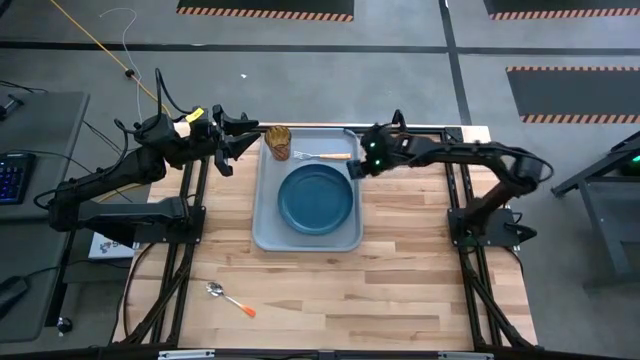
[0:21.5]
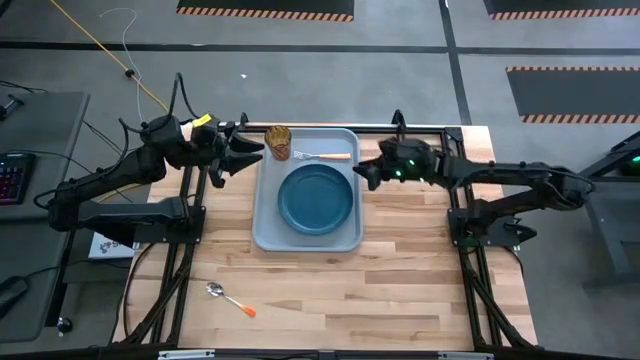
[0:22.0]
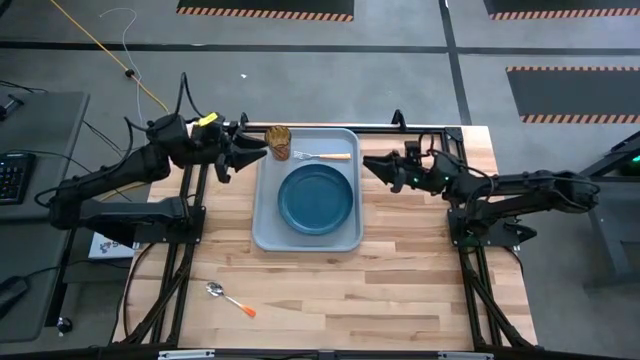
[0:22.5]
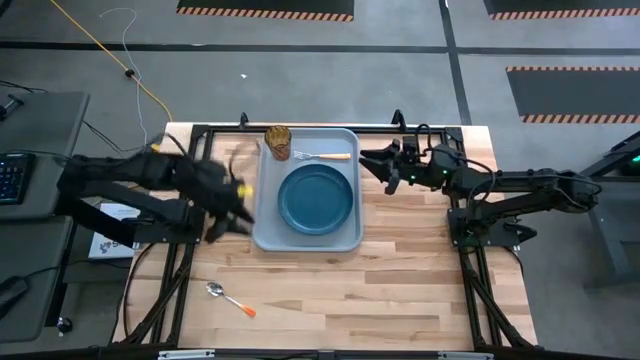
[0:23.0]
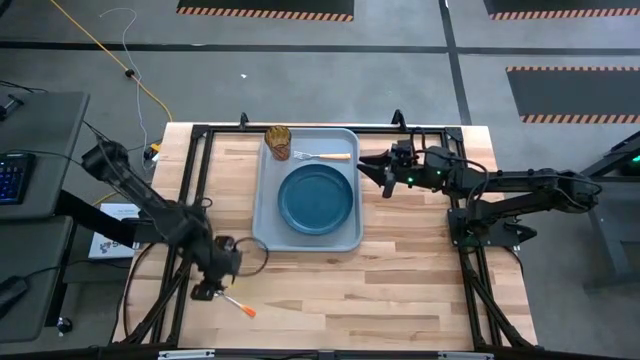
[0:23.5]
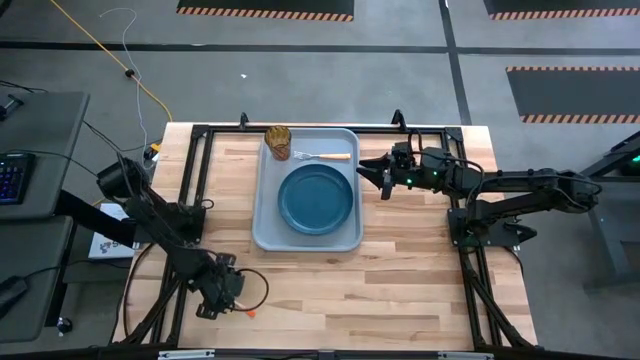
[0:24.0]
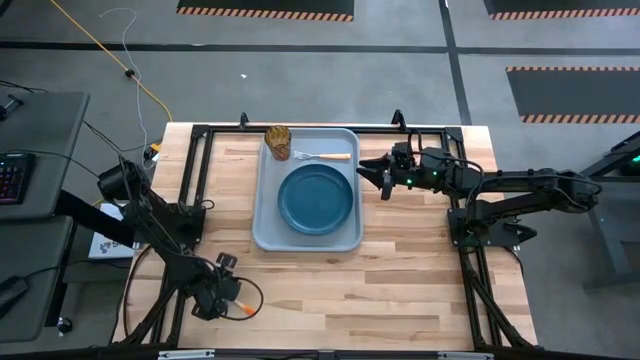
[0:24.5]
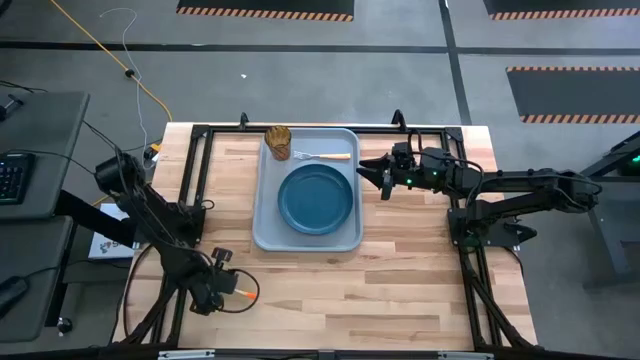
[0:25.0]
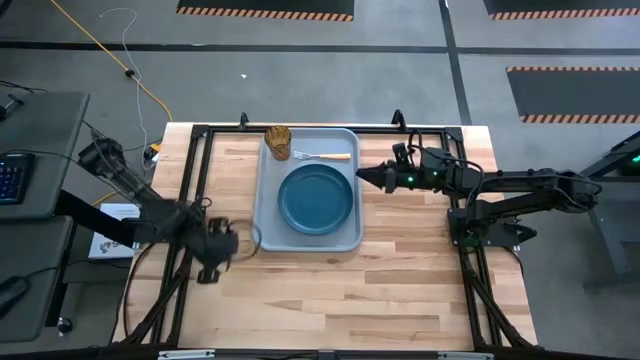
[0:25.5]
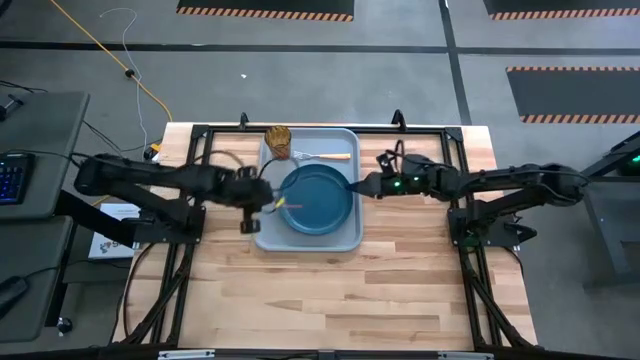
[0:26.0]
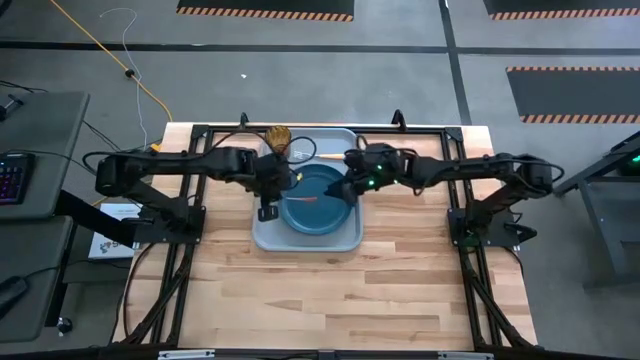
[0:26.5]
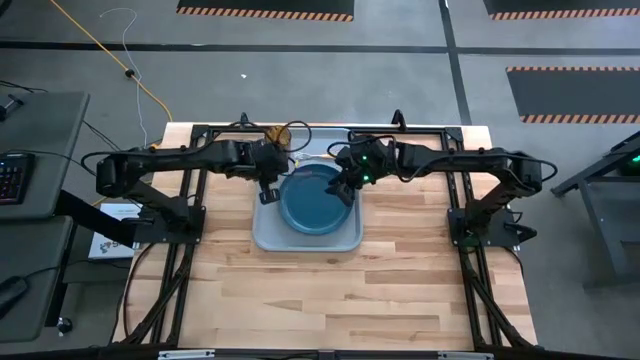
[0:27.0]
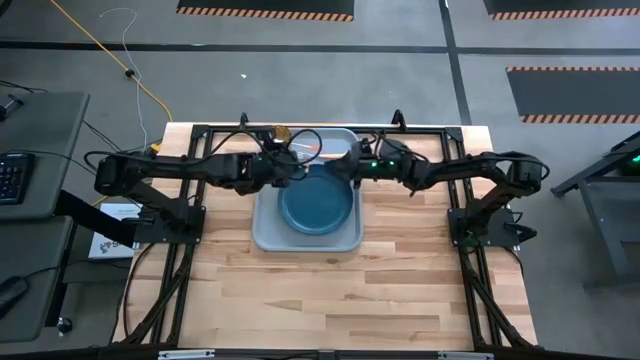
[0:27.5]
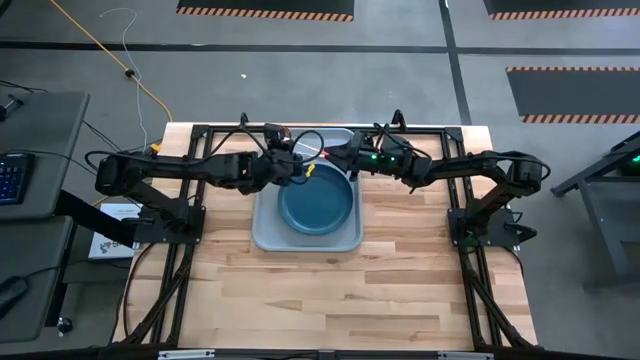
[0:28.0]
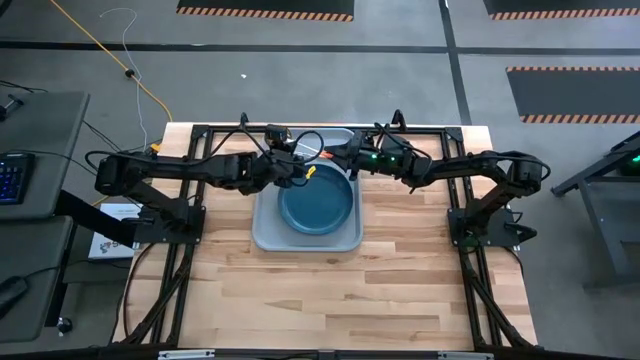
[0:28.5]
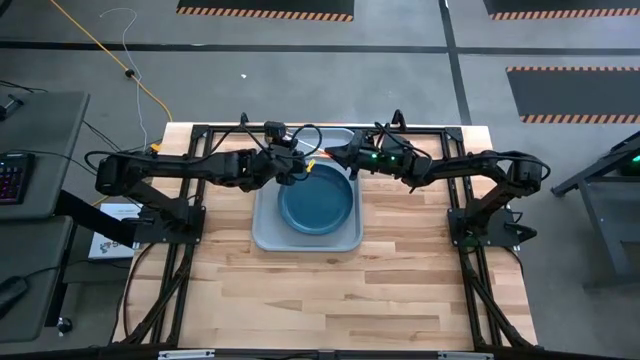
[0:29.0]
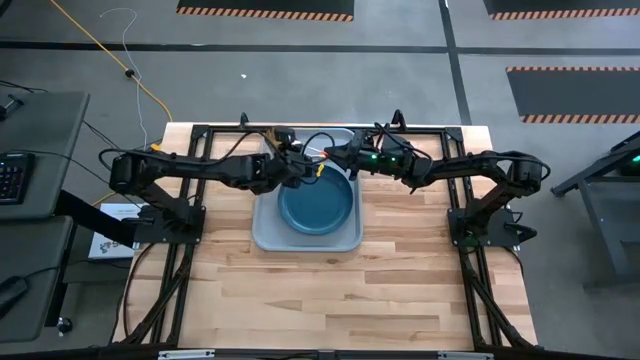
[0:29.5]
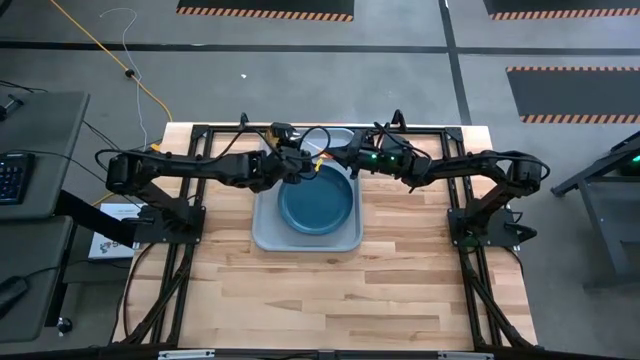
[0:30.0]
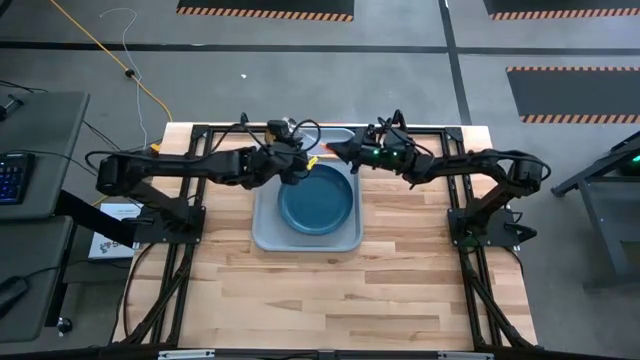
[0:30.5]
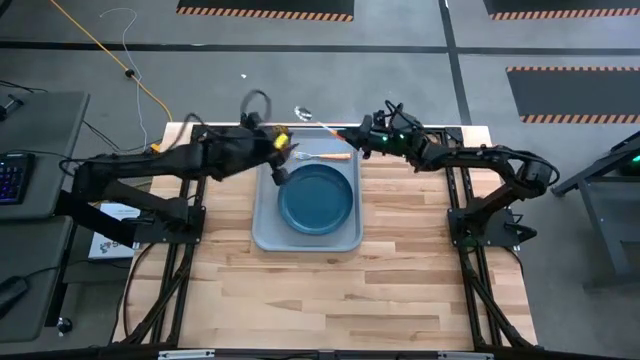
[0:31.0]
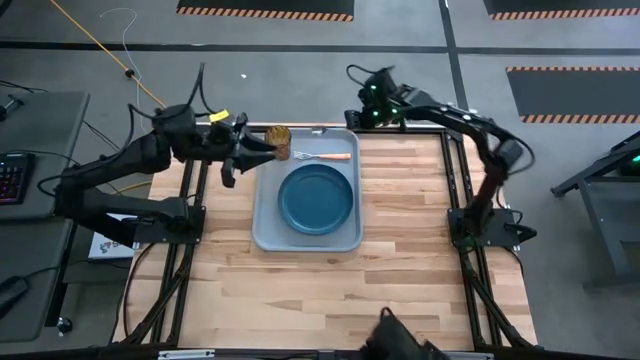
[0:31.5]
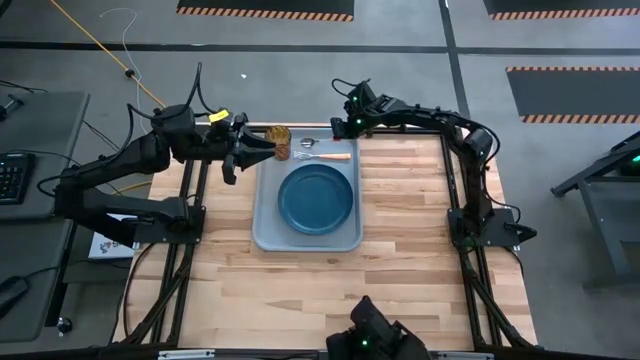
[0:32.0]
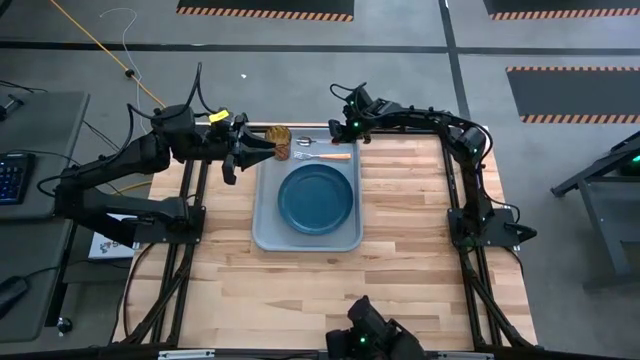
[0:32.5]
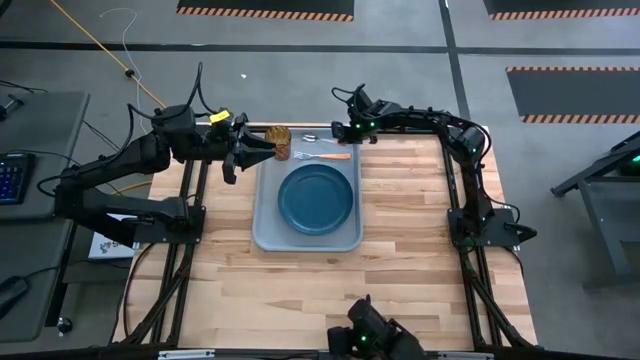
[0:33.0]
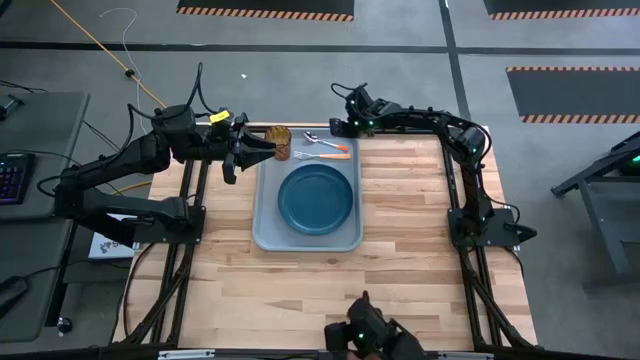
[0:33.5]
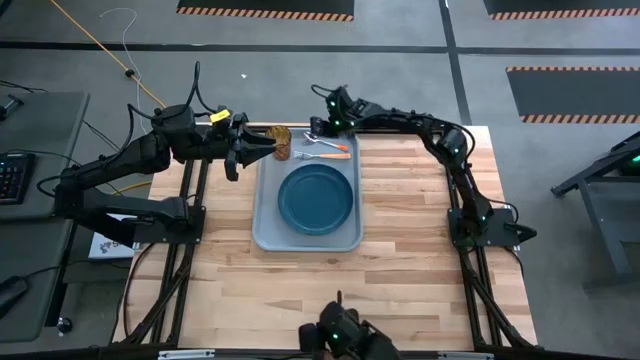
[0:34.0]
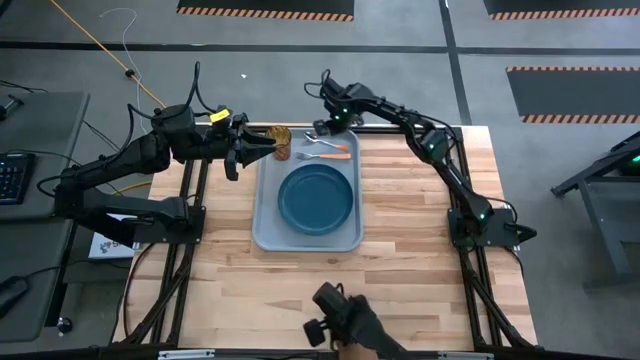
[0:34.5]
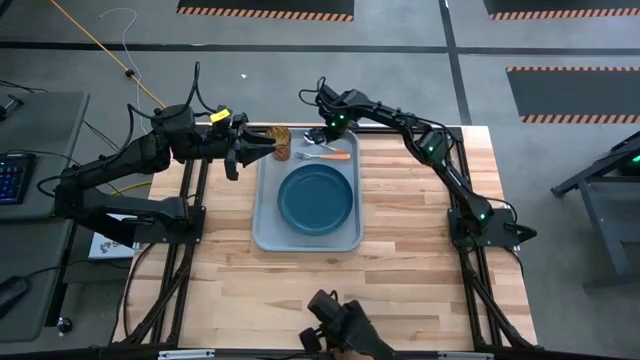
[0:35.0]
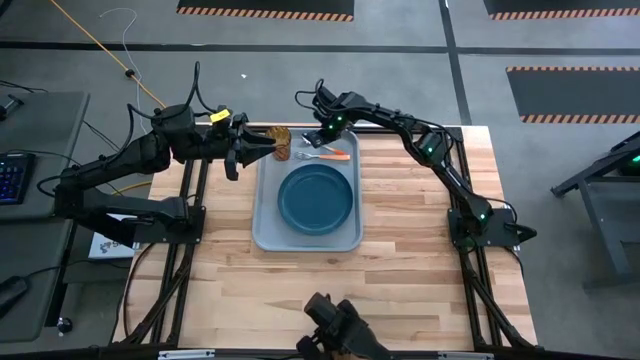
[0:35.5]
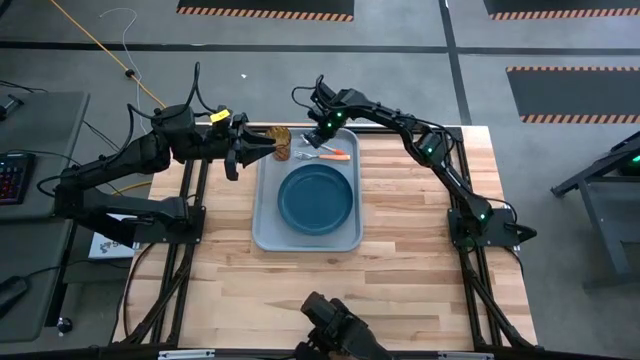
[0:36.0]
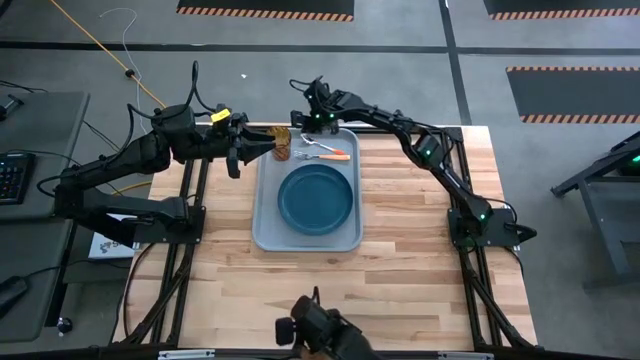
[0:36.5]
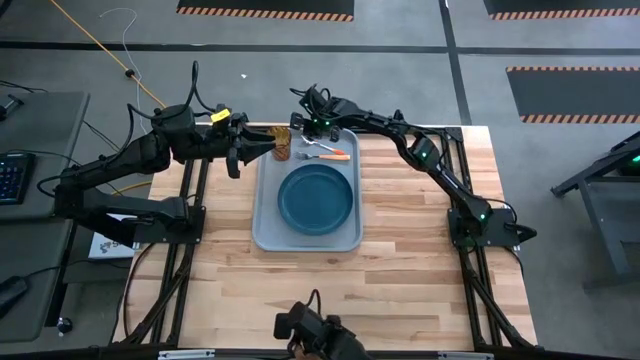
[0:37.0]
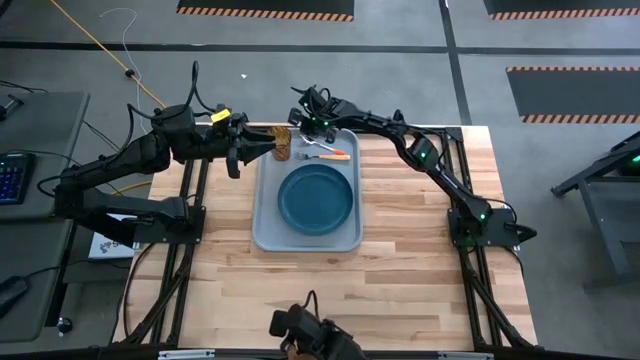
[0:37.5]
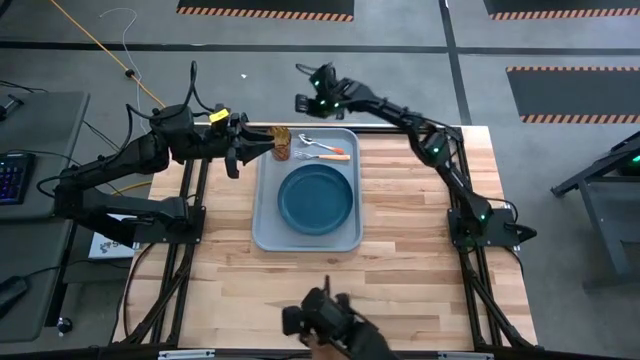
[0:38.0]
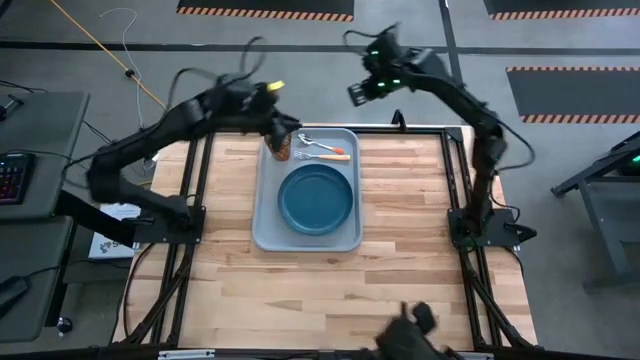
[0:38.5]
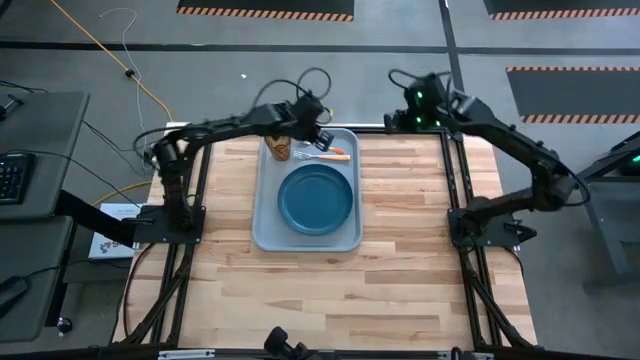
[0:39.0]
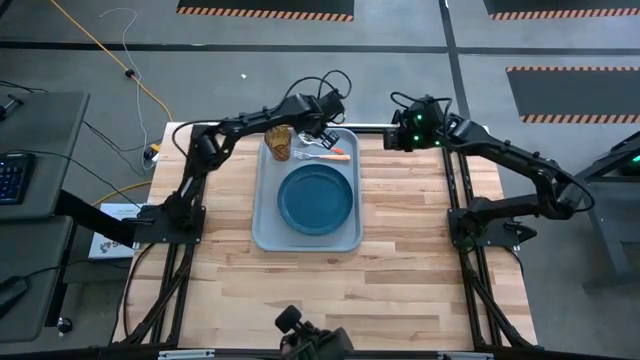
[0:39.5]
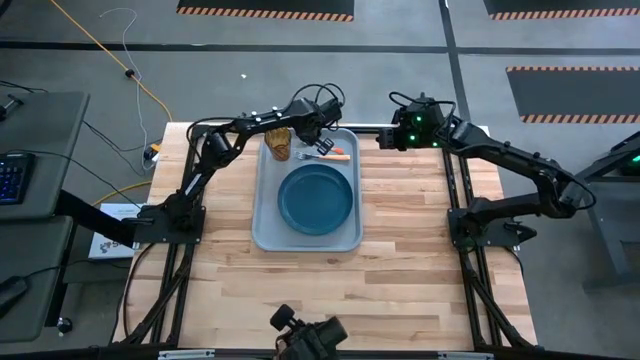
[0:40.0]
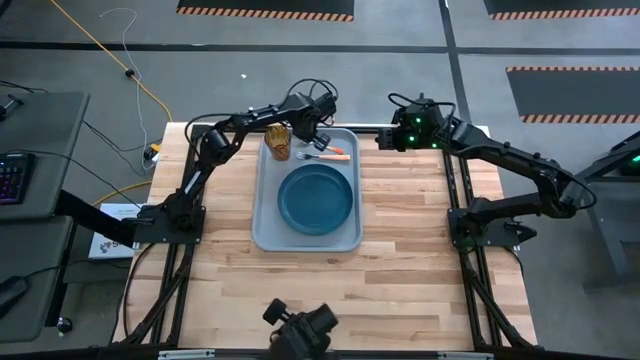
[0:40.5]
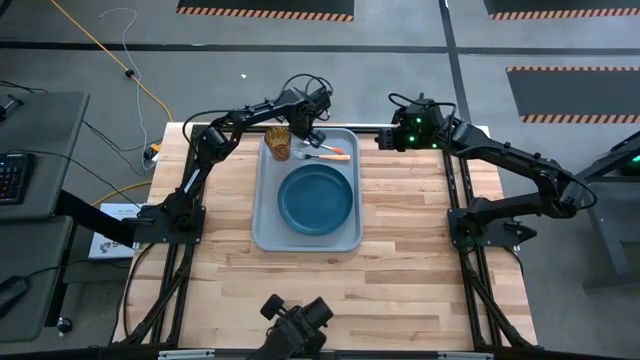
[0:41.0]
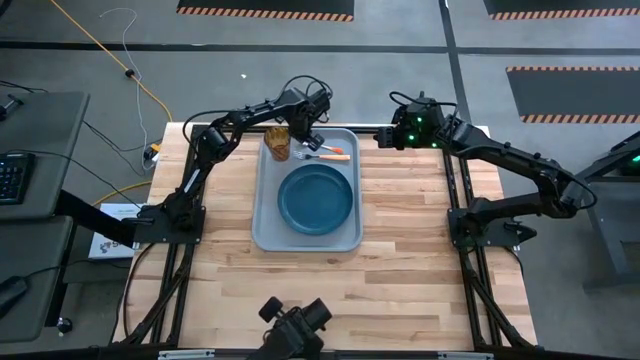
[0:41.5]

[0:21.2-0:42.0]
Task: Pick and place plate/cup/fork/spoon on tray
Put the orange spoon on top of the yellow fork on the gray tray

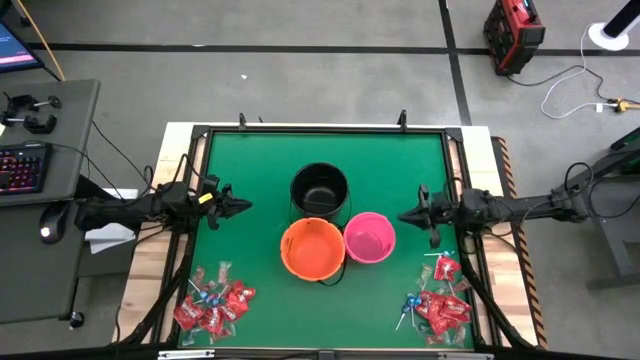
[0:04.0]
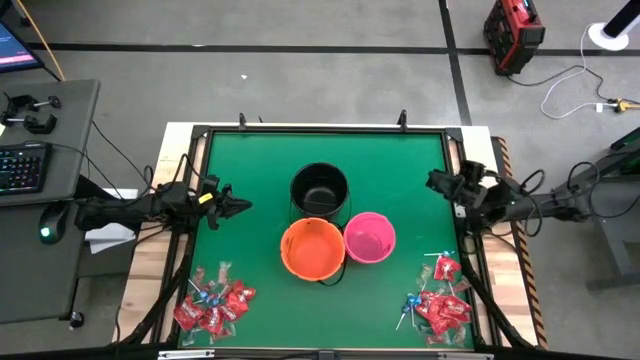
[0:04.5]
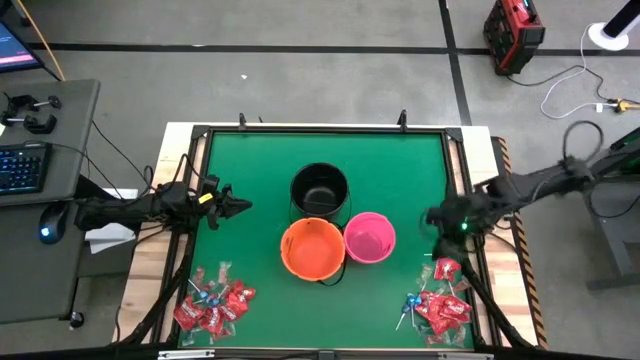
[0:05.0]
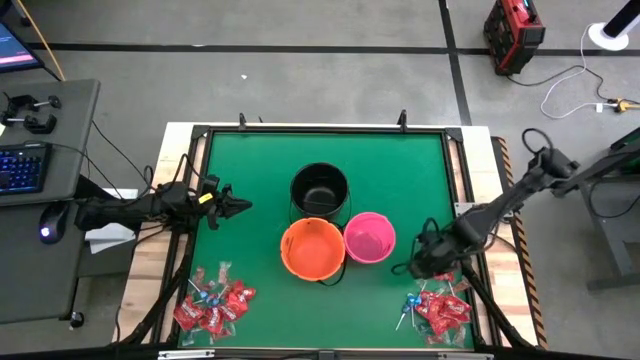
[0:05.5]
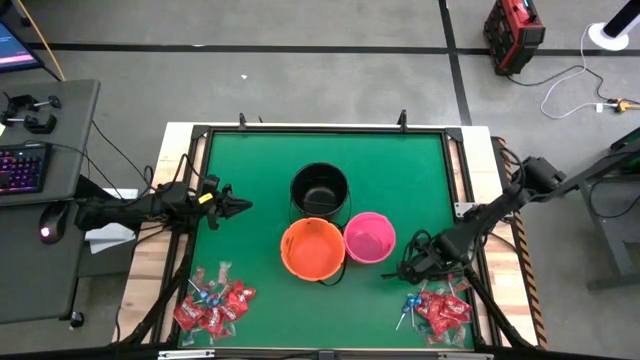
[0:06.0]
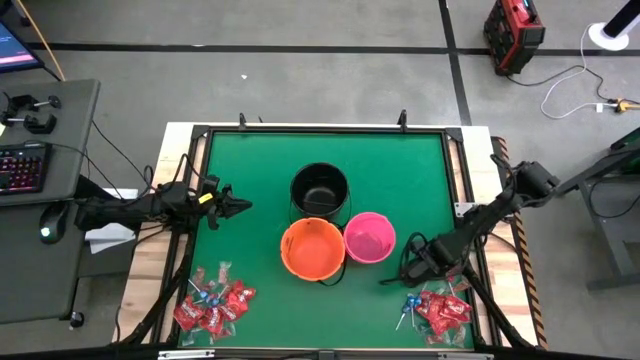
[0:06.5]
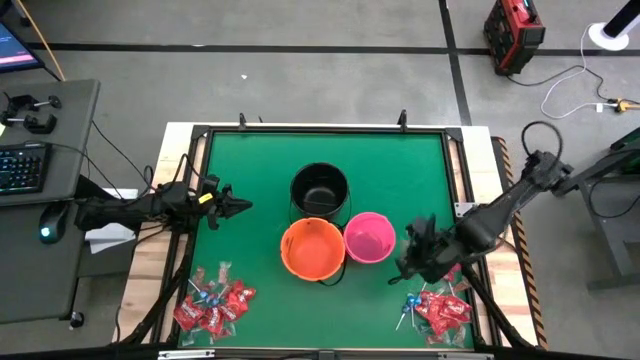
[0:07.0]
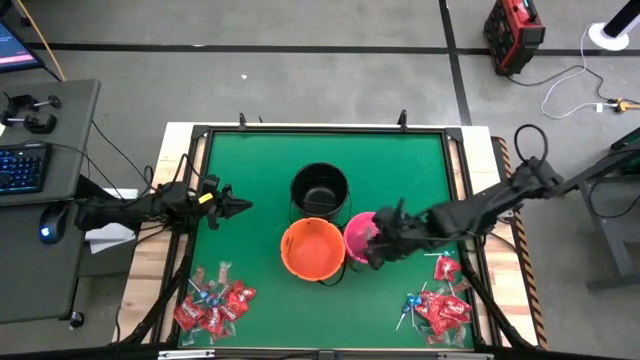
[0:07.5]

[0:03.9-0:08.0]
Task: Sort candy by brand, put in halloween buckets
Put the green gummy into the pink bucket
